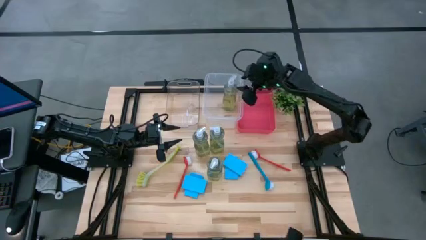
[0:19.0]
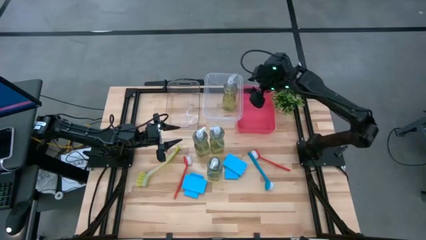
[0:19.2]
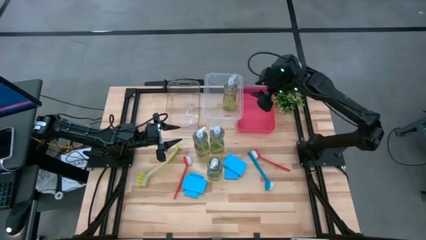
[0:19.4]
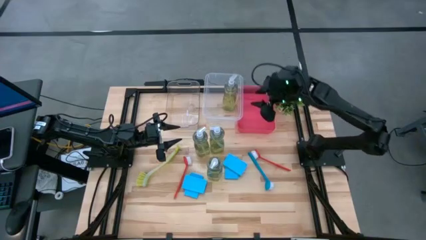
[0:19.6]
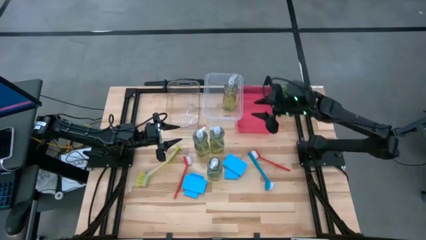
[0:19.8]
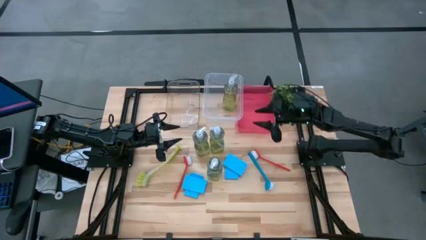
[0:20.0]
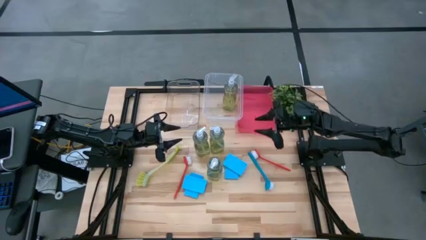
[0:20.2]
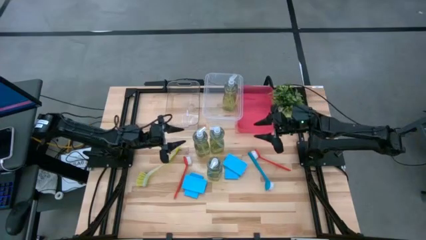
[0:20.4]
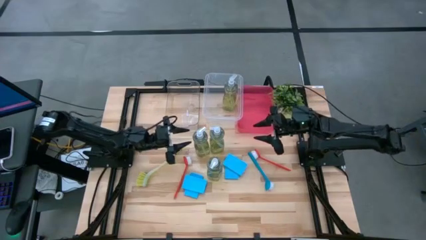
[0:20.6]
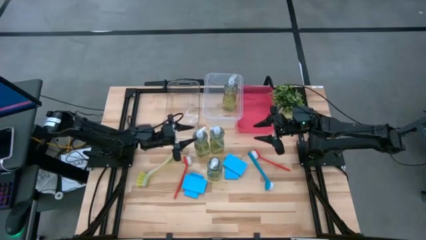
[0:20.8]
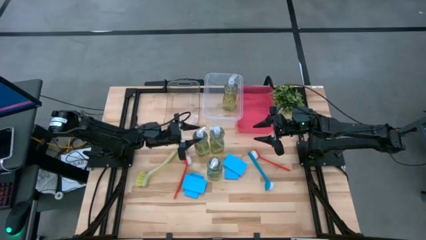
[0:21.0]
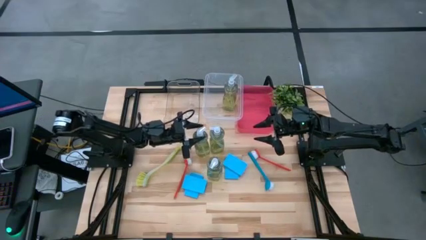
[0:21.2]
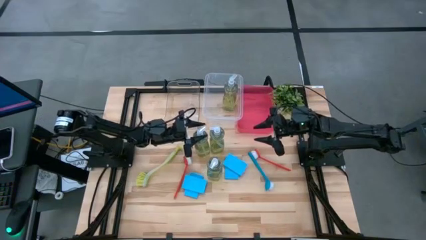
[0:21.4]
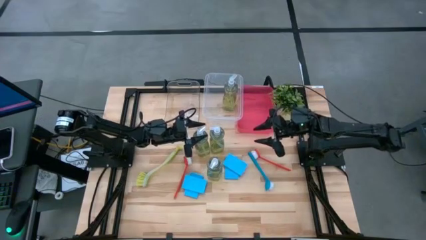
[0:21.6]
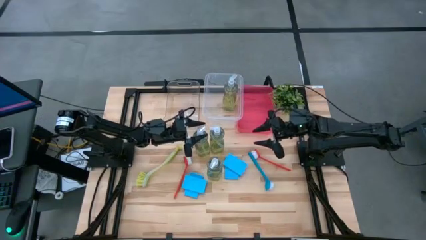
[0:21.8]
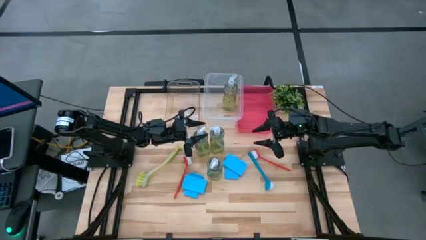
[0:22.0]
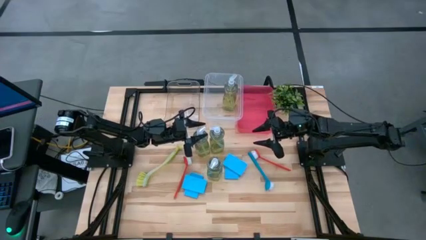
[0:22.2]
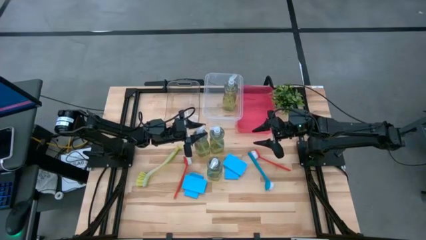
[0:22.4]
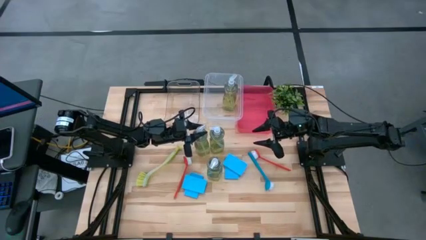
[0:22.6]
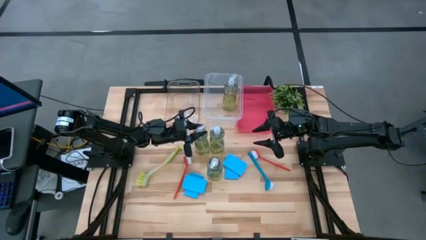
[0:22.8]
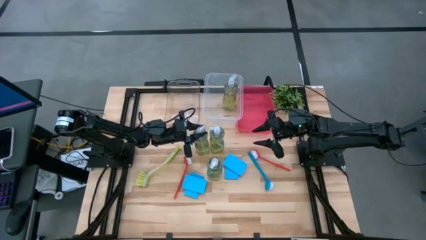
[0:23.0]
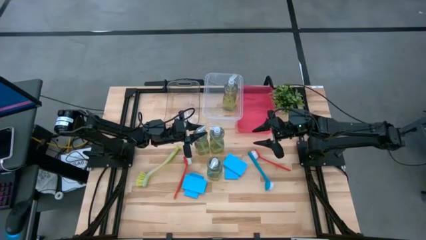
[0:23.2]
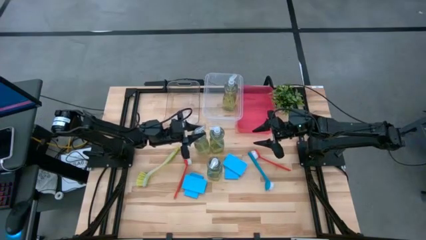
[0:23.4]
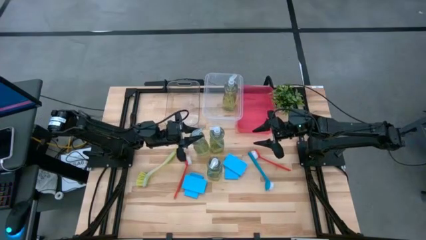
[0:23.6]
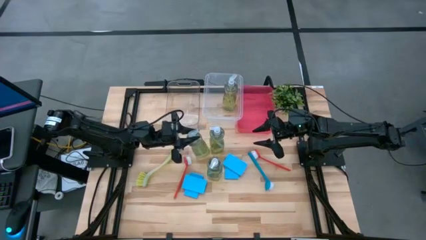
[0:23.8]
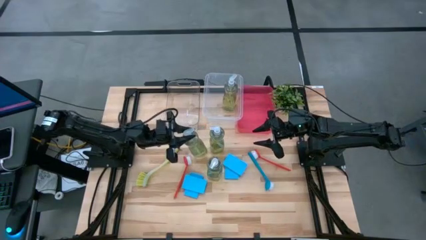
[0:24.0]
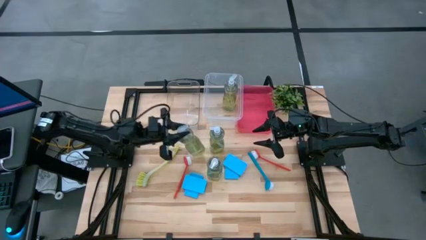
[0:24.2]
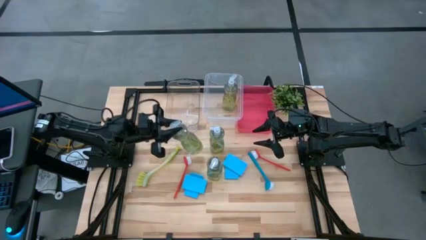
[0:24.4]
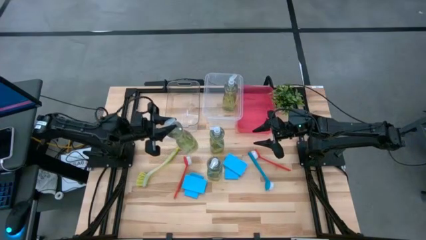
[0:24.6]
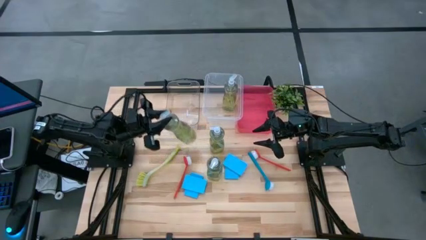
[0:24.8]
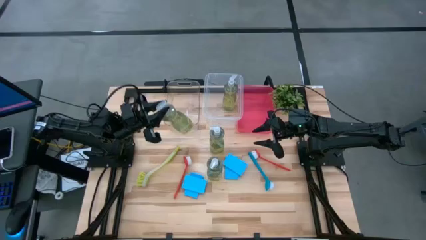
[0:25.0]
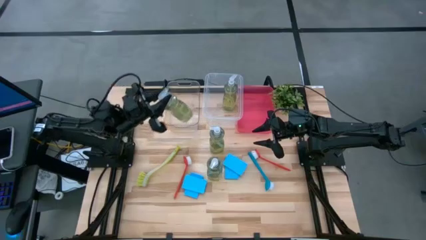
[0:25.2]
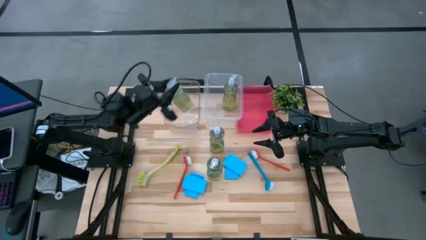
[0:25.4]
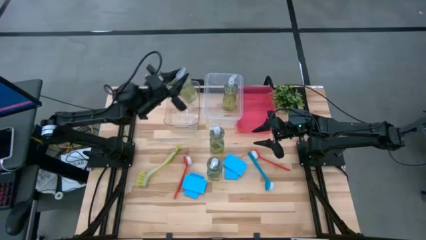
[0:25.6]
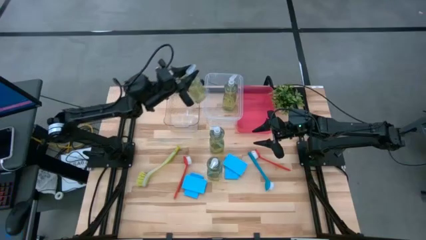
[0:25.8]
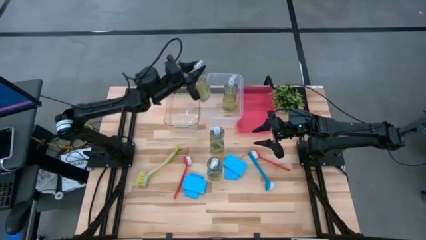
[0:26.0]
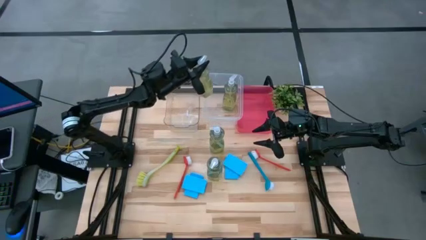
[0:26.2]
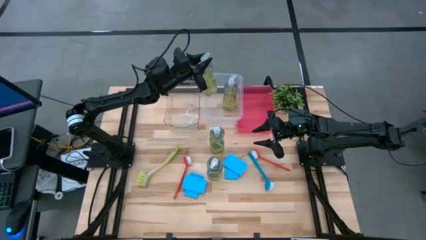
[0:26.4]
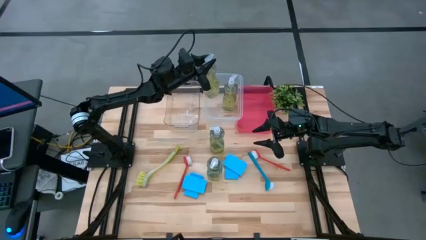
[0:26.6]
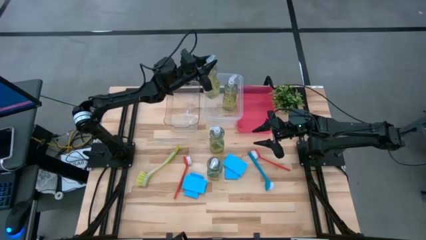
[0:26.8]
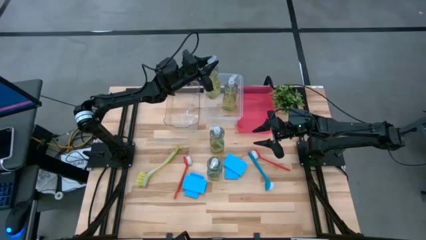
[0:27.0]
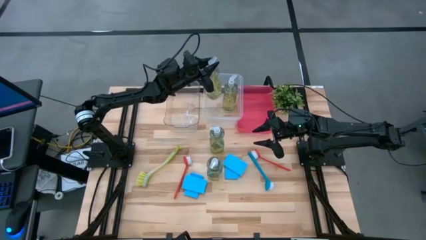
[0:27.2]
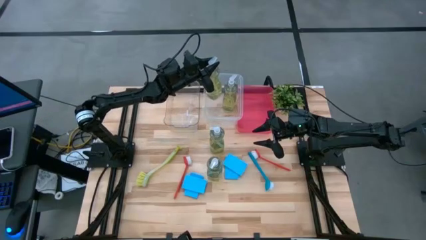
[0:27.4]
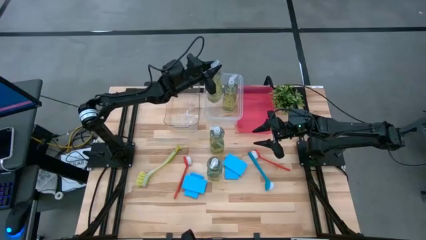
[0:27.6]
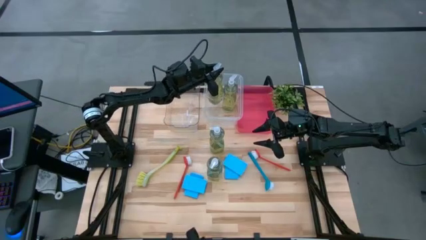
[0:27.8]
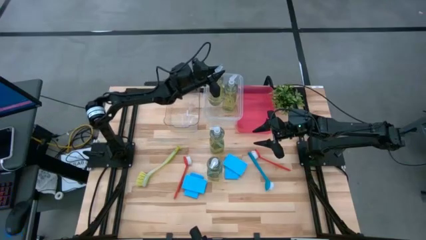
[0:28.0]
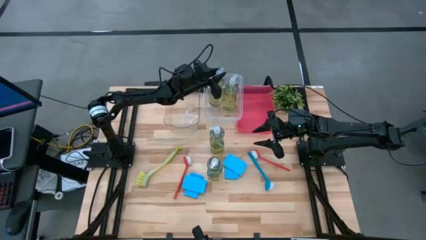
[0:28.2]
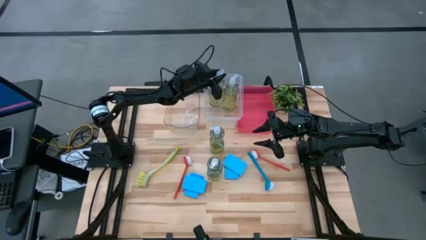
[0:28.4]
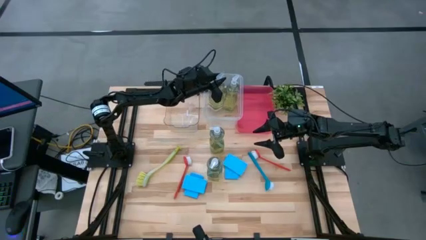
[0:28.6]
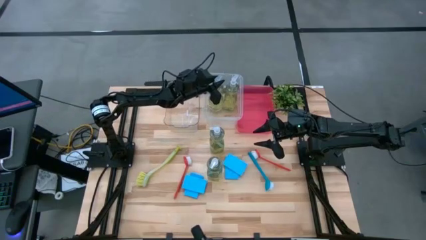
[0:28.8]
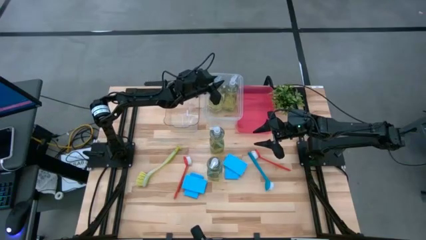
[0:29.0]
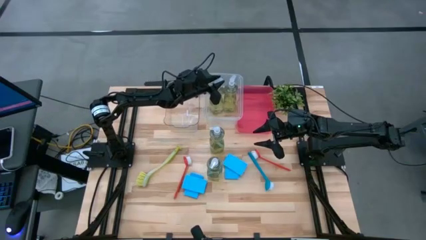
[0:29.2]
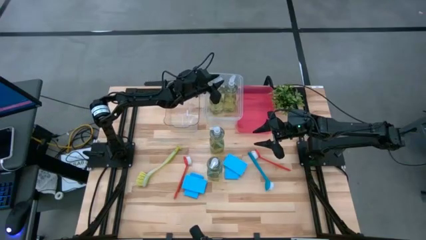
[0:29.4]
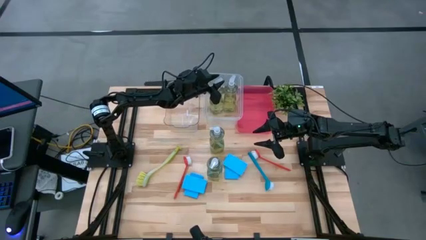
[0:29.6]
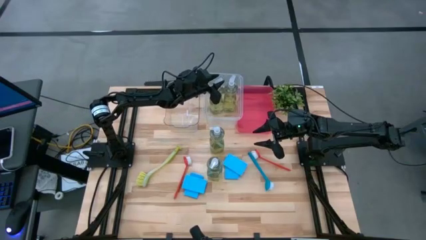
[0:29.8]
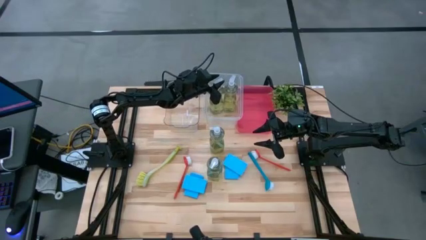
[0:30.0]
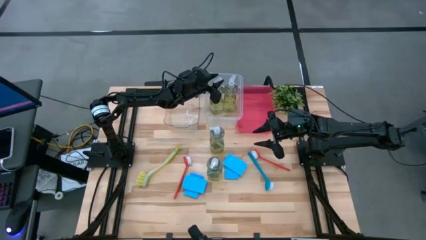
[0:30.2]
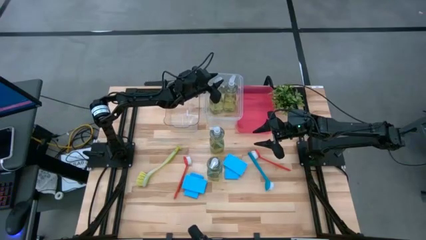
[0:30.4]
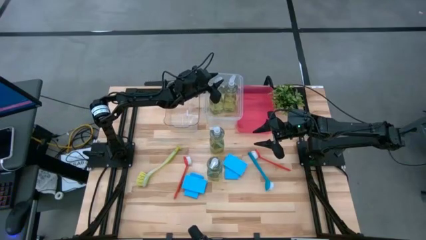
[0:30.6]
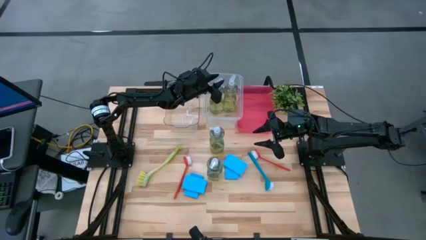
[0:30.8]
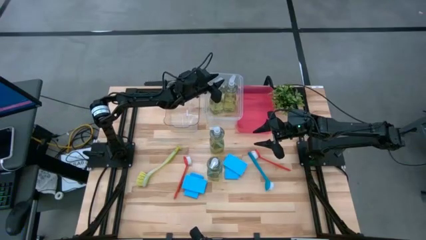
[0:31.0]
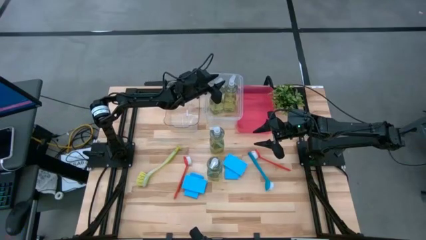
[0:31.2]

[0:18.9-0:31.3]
Task: Pick & Place Kitchen Sink Supplies
Put the green dish soap into the white bin

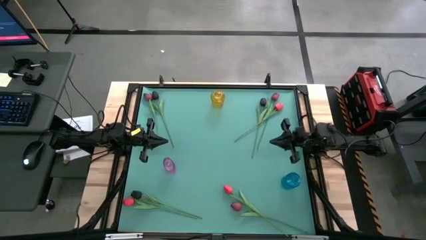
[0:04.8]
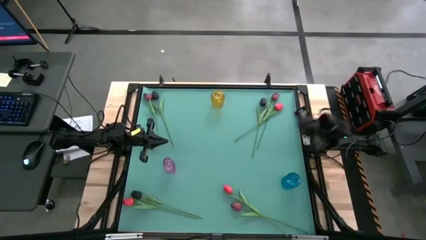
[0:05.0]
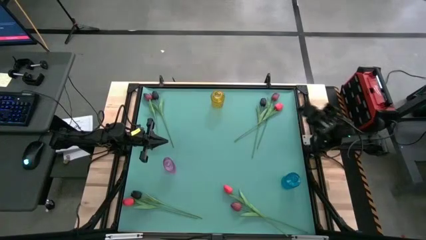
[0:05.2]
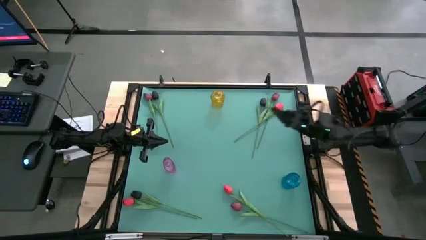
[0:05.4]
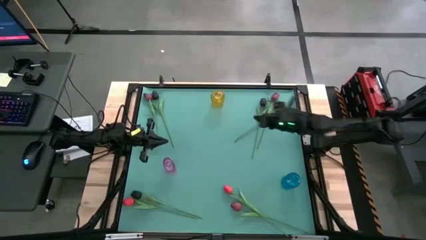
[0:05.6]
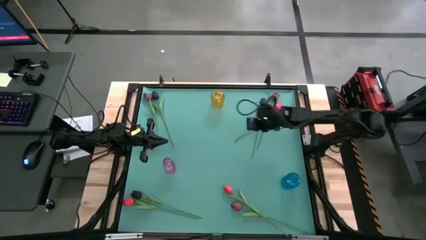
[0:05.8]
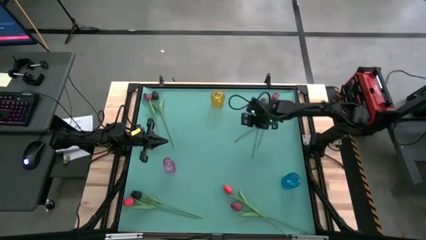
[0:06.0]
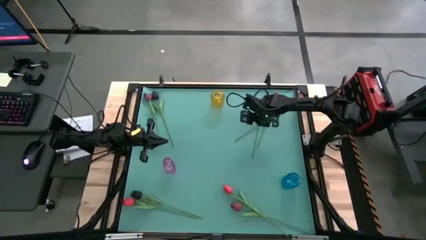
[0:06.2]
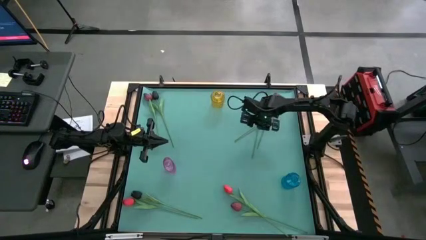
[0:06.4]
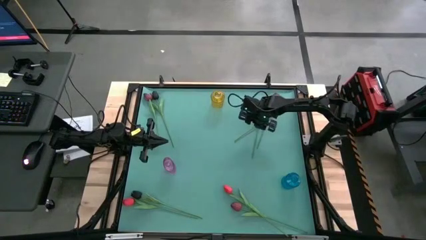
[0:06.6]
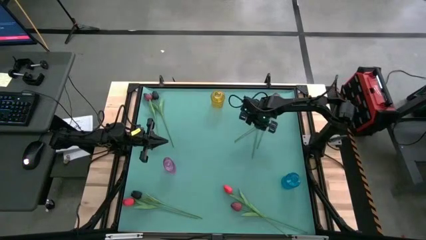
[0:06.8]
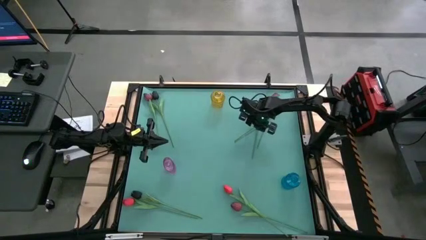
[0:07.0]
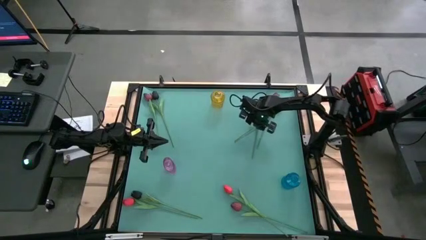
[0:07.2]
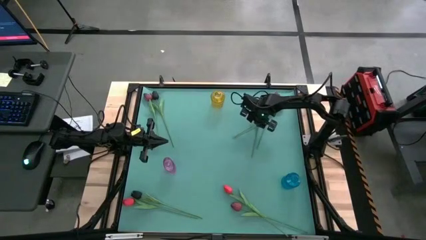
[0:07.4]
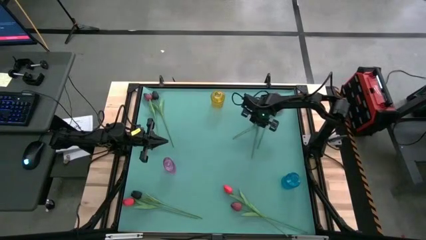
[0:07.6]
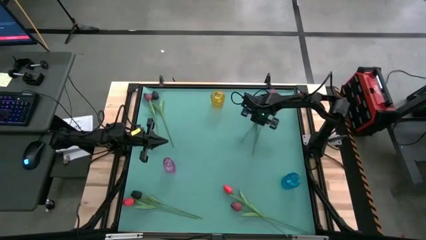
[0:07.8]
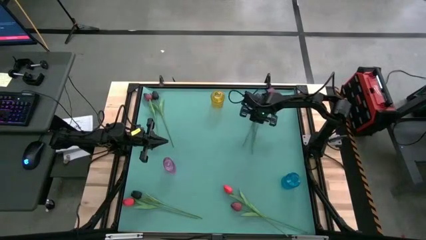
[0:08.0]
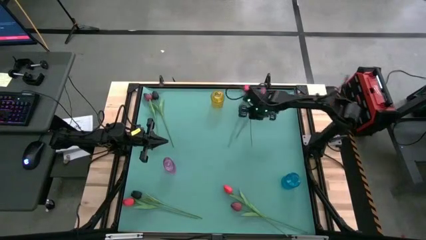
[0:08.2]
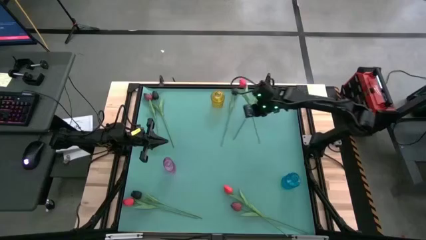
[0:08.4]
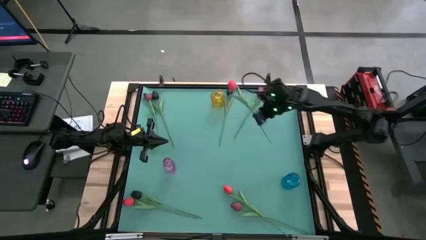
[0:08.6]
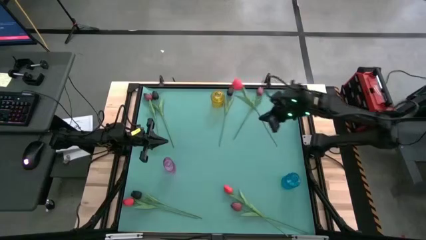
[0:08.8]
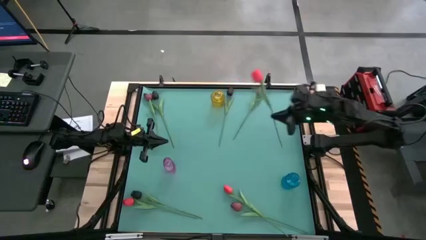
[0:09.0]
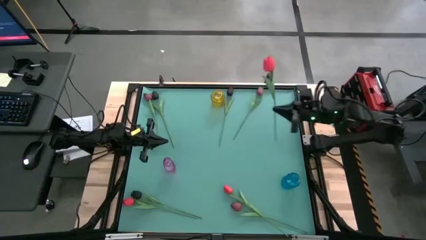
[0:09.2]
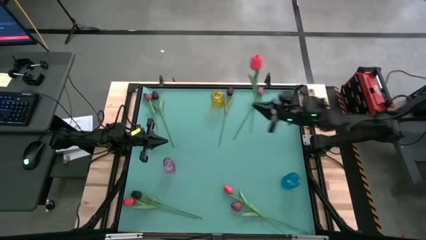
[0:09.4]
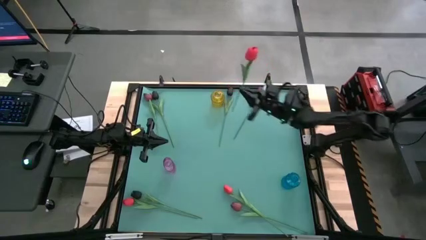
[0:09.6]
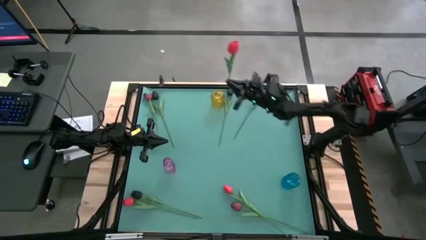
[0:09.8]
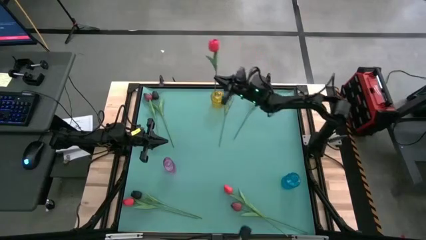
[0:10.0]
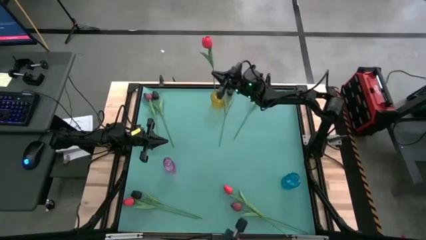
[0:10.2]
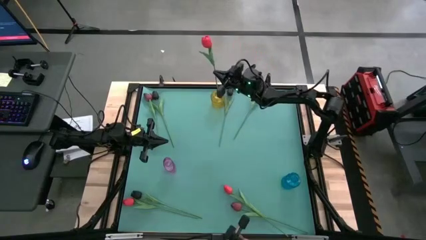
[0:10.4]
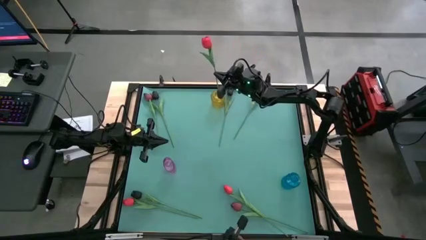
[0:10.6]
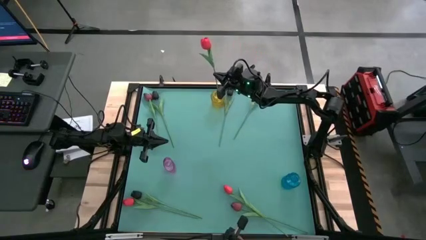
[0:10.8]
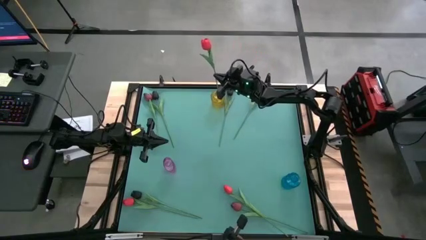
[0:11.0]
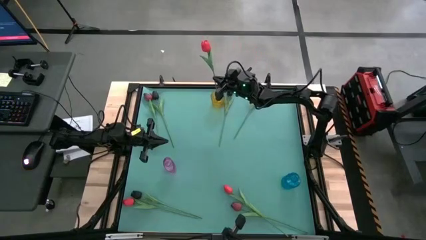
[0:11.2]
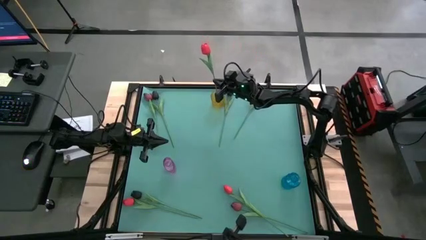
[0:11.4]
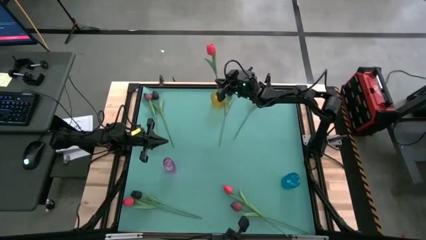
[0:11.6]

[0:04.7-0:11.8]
Task: Sort flowers into vase by color
Put the top red tulip into the yellow vase
